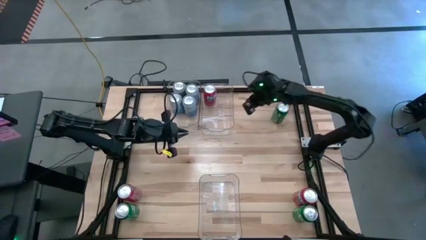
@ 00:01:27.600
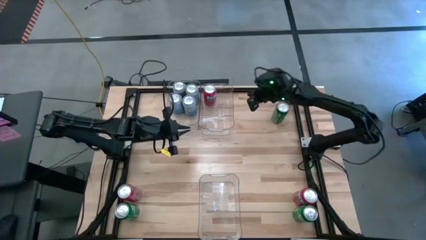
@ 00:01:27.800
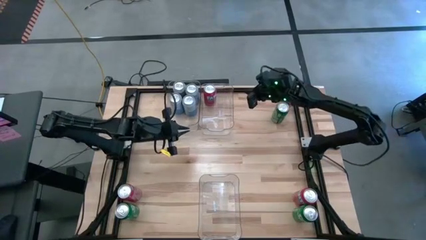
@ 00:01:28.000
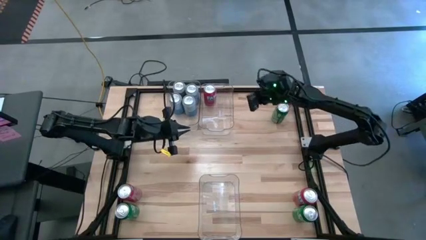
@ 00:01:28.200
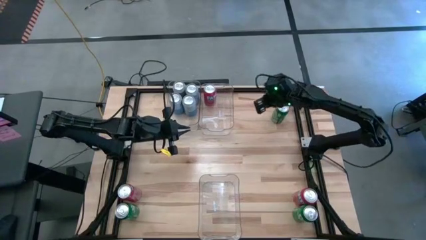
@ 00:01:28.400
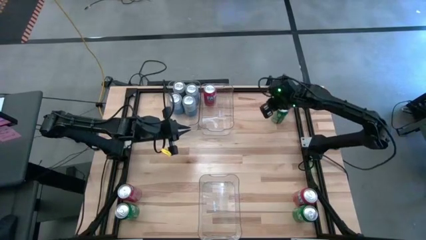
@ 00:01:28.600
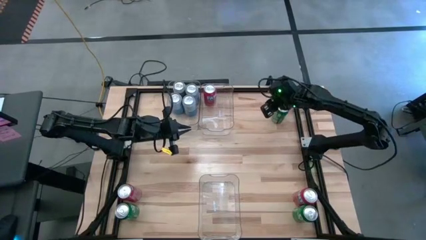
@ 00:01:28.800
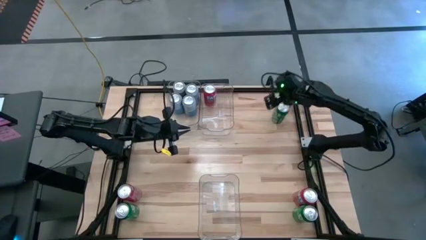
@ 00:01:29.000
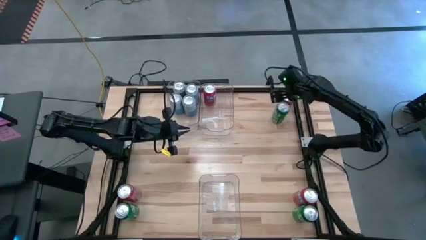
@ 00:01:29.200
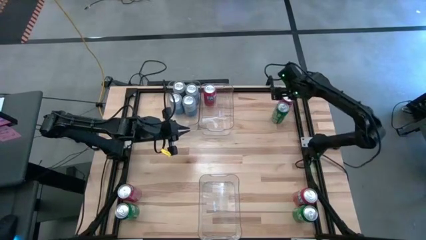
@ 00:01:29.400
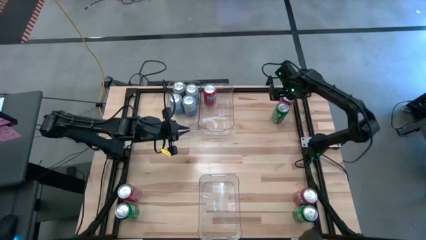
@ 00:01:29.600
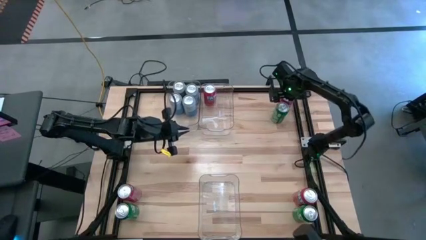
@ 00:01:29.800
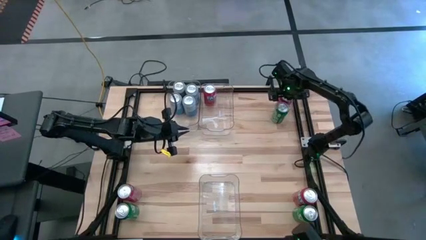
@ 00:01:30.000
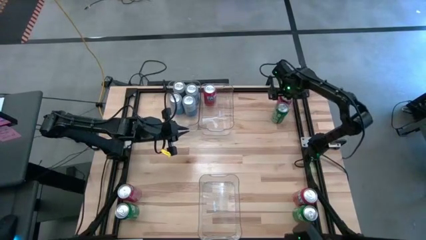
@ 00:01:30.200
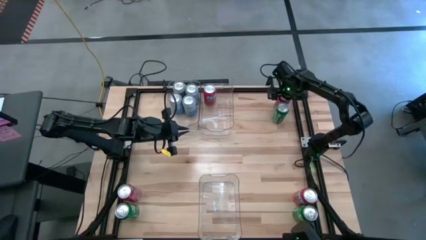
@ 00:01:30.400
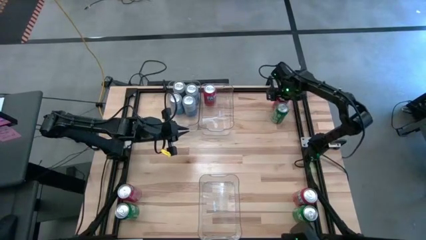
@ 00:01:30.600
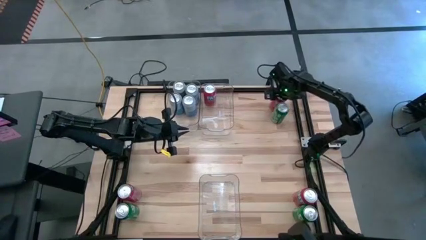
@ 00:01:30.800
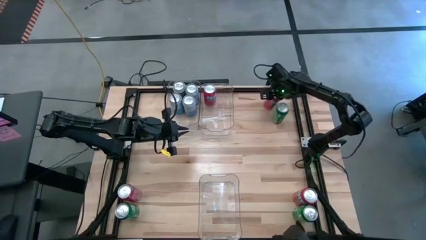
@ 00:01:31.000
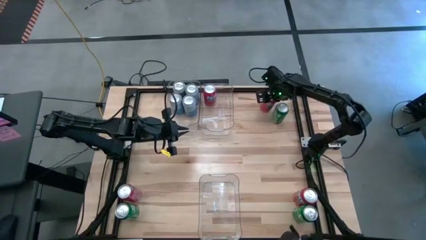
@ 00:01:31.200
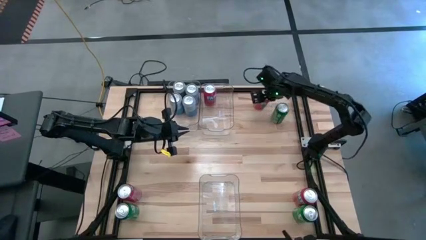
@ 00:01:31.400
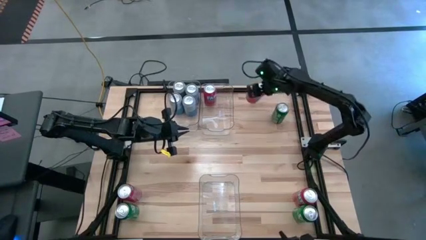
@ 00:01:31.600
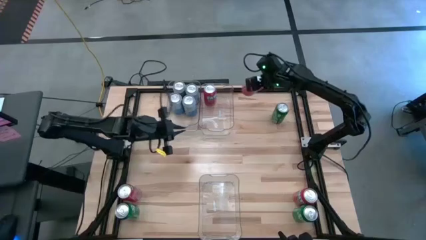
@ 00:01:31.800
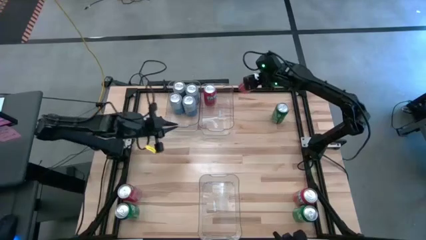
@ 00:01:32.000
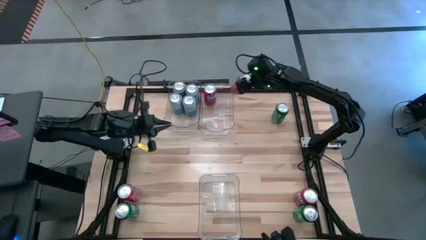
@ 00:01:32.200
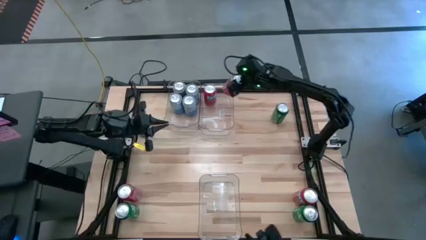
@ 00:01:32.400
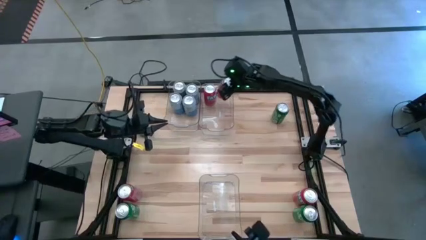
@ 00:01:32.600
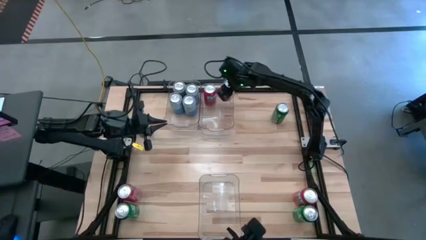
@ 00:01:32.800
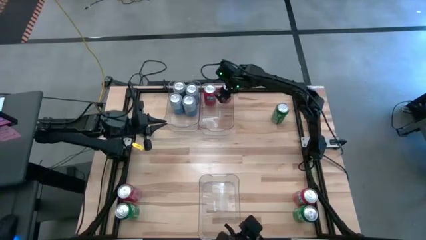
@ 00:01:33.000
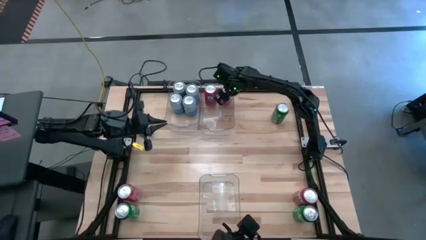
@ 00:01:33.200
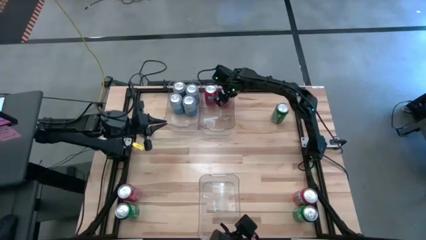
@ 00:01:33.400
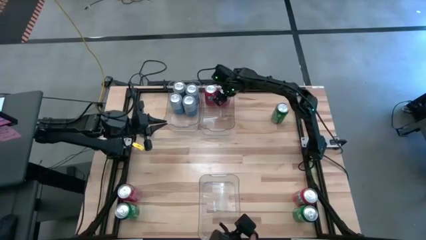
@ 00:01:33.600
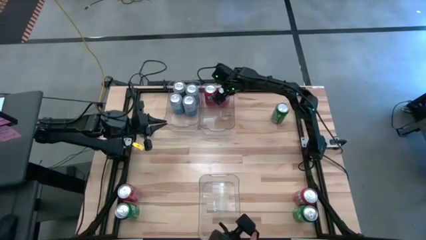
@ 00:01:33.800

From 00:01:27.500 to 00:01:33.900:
Task: Sort soda cans
Put the top left red soda can into the top right transparent bin

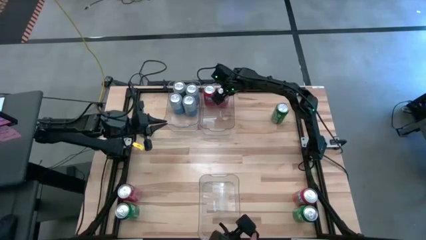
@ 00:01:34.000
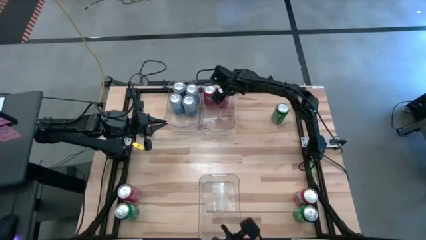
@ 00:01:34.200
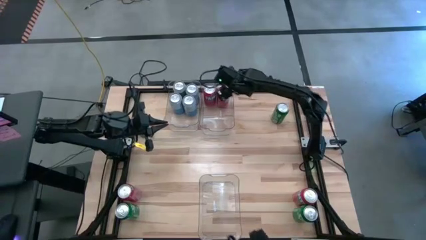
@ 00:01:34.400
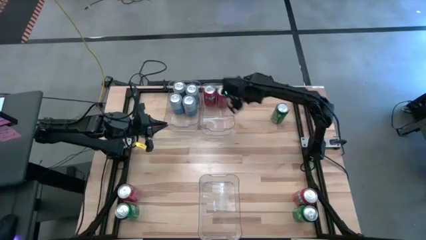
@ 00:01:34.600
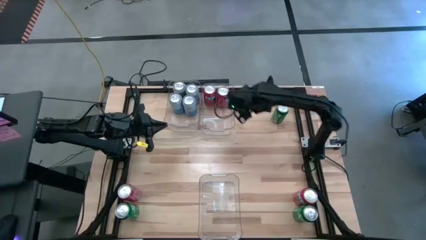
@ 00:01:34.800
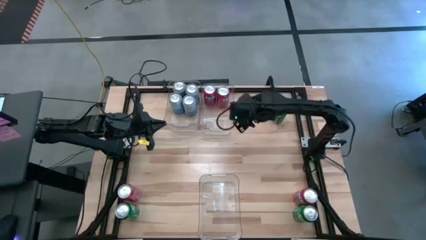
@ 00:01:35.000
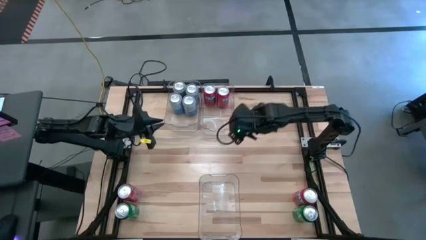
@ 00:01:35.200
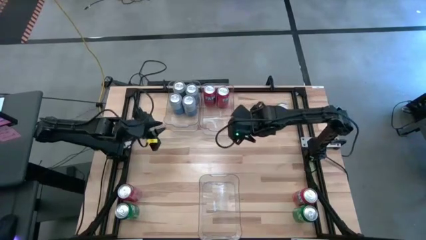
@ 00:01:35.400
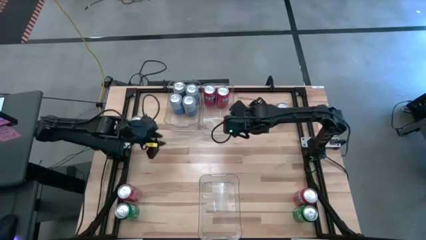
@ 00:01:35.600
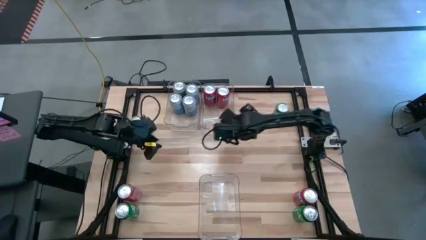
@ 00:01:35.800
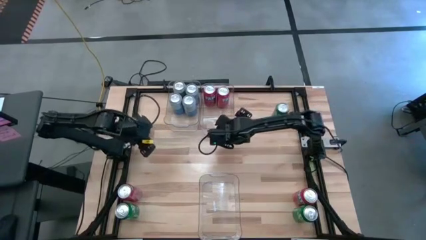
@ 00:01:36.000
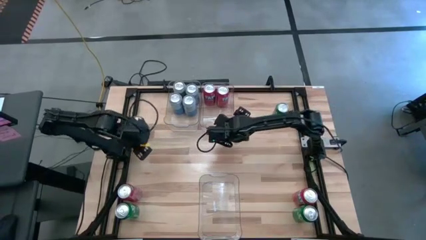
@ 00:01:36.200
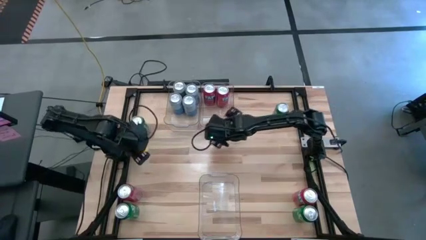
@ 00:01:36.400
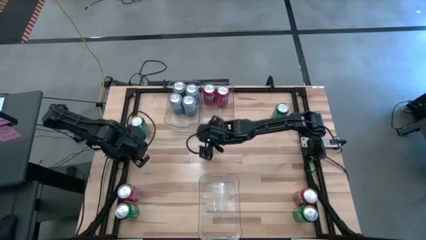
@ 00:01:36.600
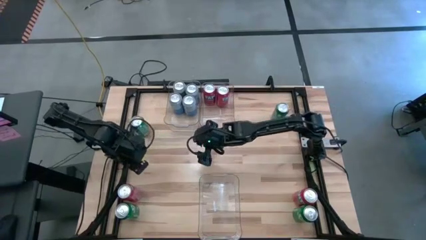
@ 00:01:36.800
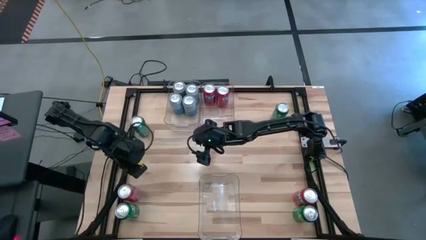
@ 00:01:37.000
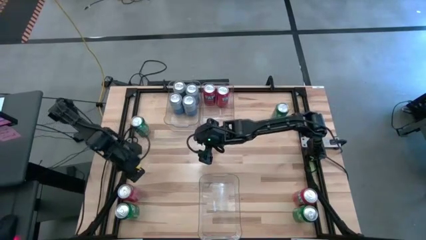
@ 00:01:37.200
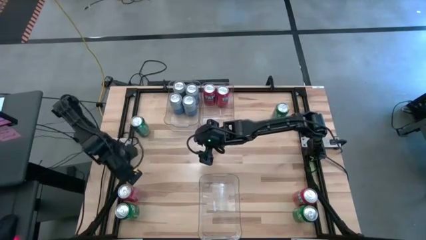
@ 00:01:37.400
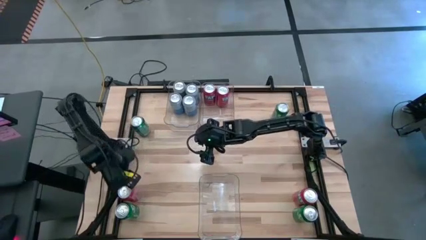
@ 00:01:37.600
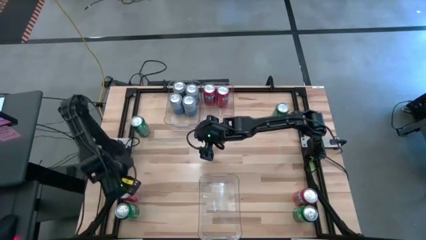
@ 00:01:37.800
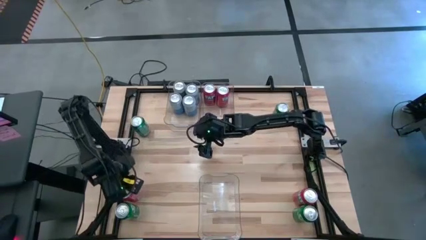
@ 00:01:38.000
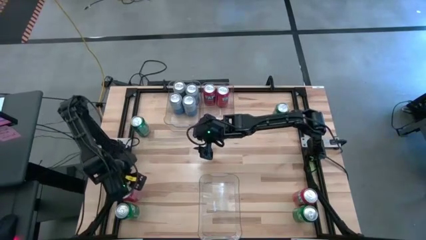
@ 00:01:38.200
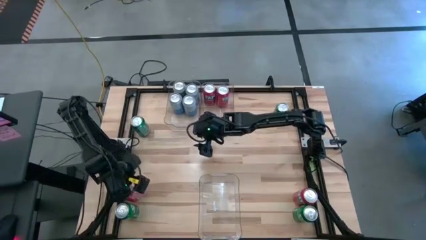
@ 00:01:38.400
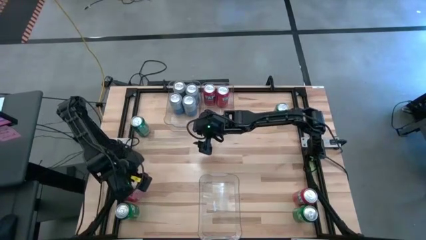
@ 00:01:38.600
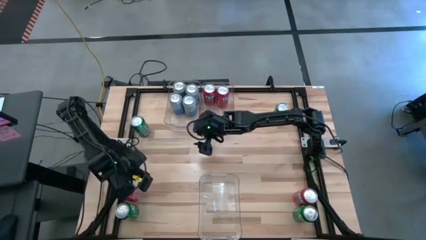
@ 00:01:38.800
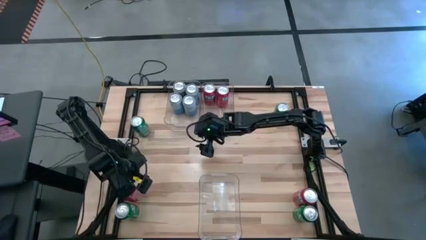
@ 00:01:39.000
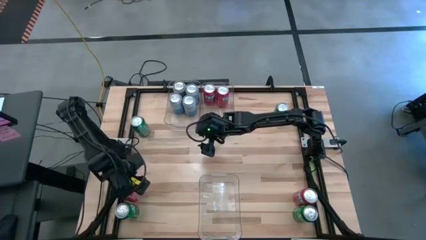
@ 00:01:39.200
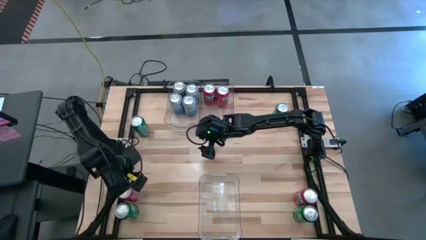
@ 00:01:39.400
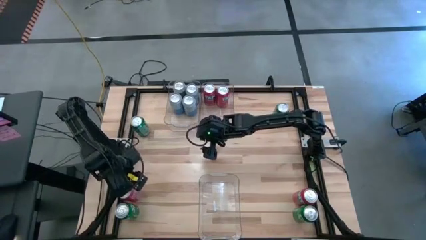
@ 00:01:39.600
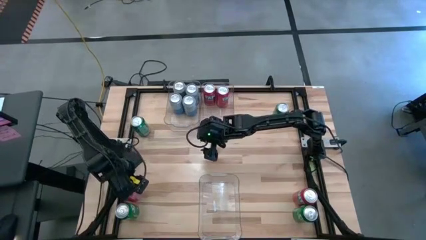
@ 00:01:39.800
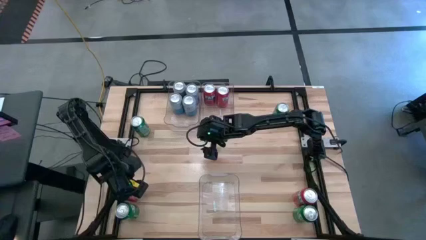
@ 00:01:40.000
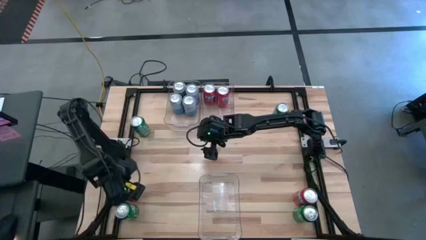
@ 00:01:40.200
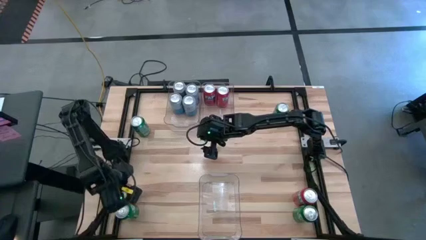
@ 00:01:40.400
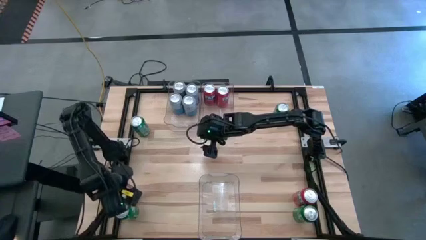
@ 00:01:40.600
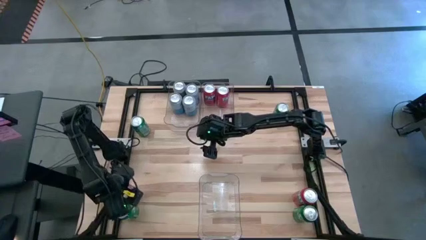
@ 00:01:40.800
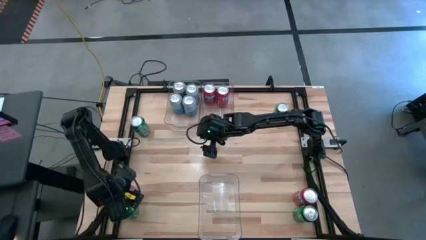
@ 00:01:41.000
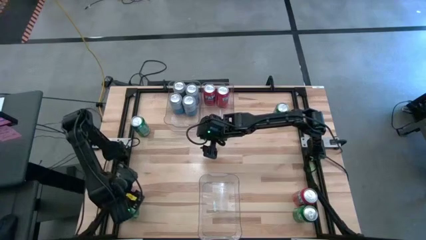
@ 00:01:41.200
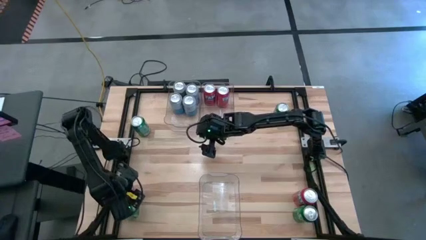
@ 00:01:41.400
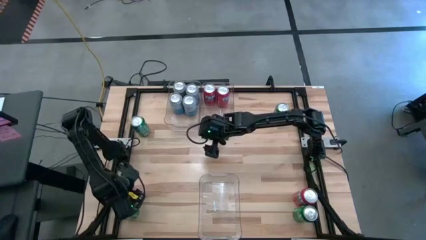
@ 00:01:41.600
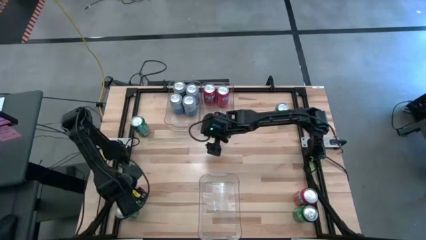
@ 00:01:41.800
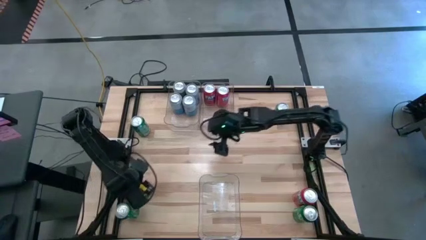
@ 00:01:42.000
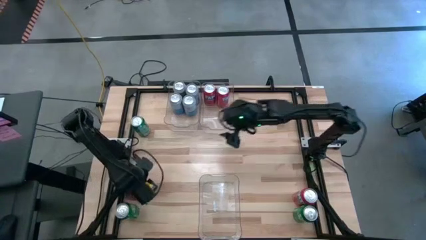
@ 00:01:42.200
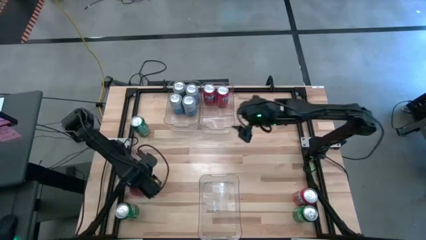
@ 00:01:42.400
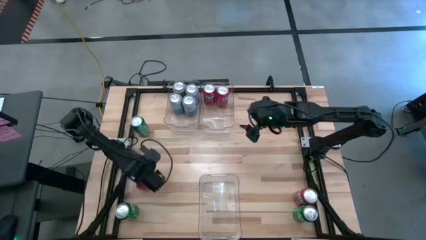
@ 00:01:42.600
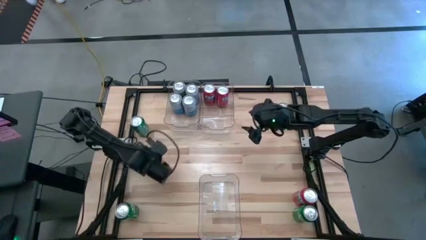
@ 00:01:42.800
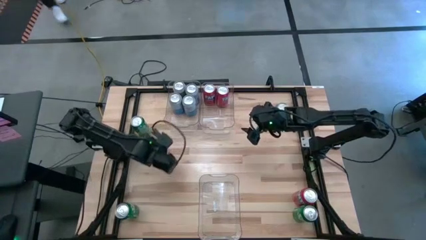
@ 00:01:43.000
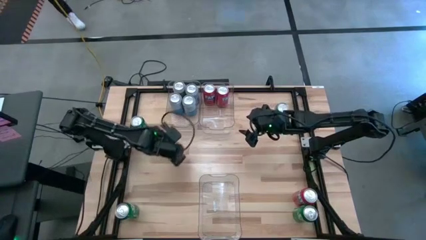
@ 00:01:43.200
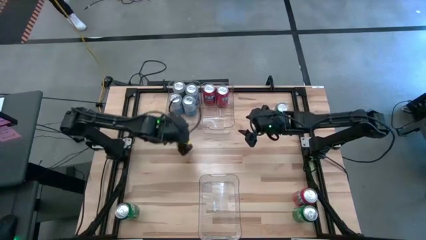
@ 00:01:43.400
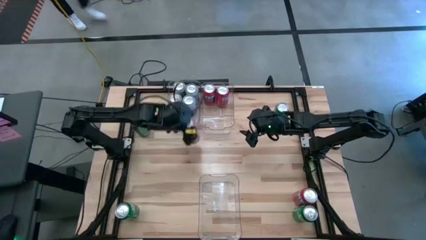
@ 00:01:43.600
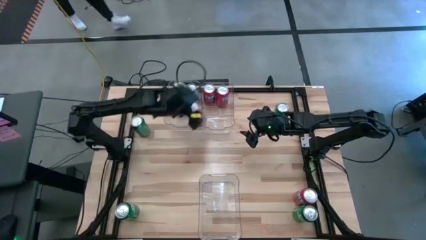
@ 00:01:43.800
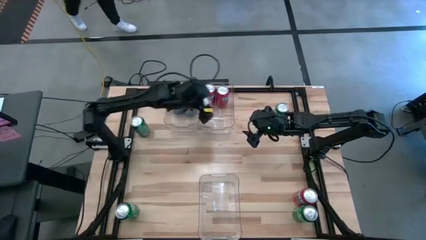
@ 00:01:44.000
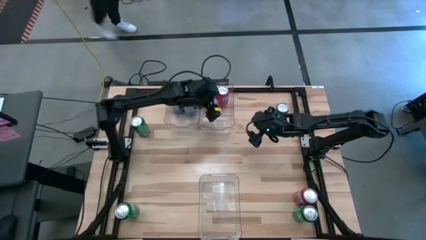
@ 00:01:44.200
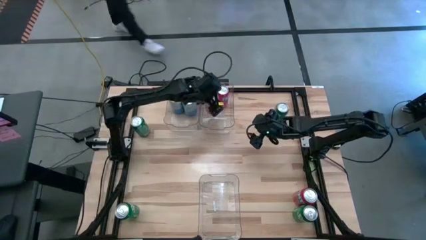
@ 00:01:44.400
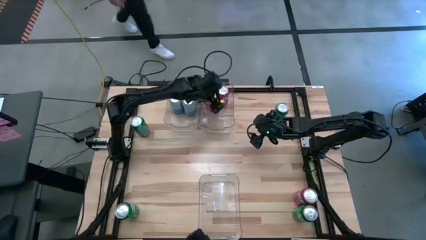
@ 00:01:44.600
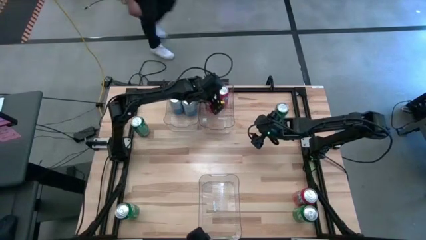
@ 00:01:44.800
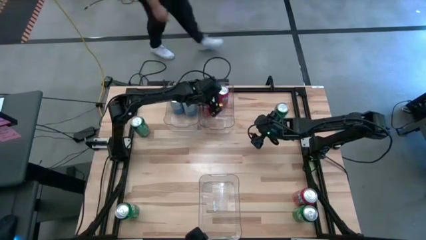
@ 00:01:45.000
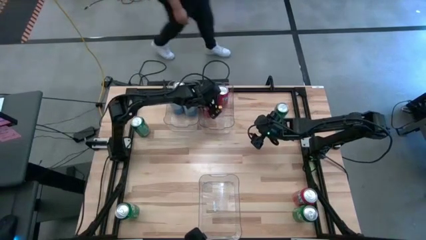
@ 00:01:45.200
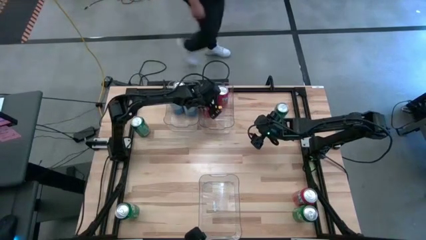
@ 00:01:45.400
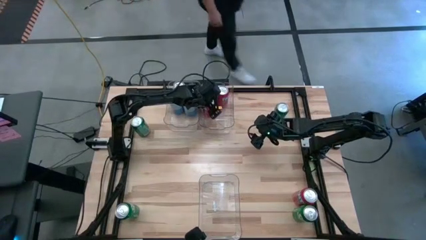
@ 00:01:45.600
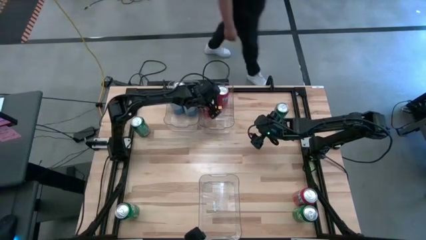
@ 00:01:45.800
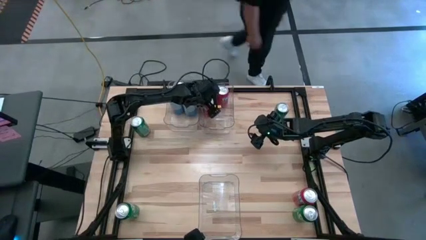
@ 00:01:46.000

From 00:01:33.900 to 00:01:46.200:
Put the left red soda can into the top right transparent bin
